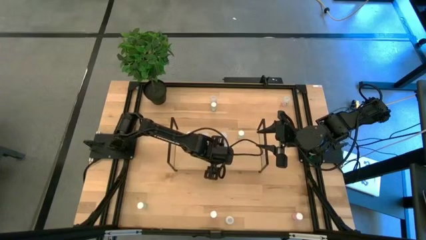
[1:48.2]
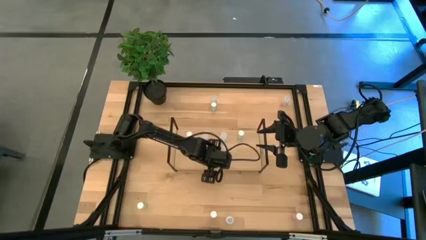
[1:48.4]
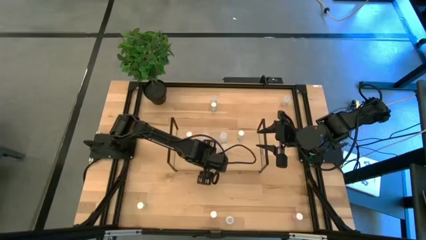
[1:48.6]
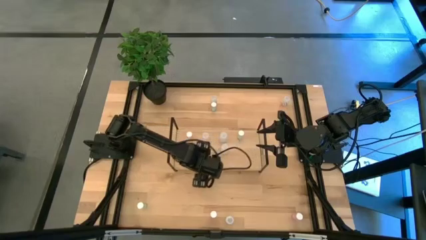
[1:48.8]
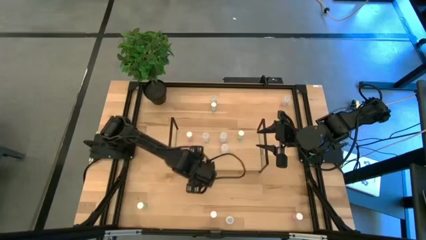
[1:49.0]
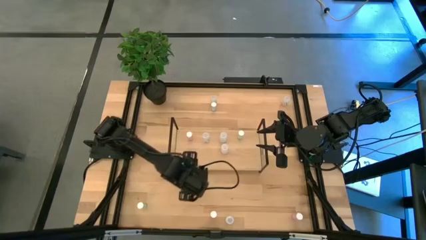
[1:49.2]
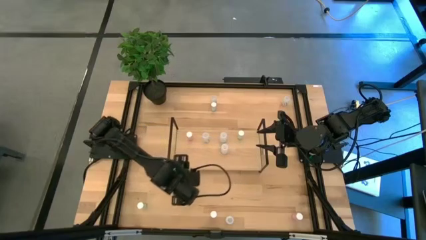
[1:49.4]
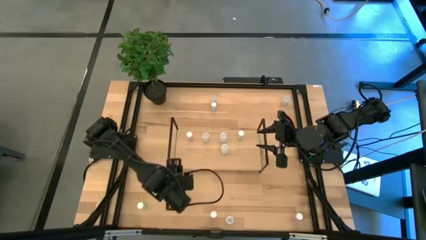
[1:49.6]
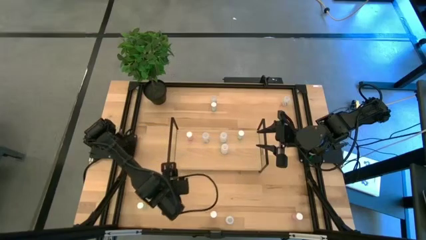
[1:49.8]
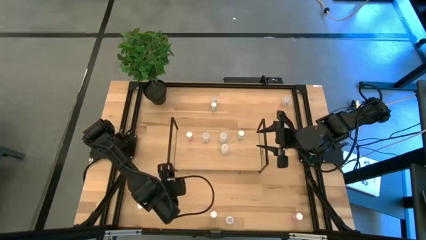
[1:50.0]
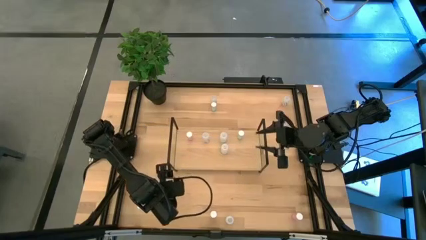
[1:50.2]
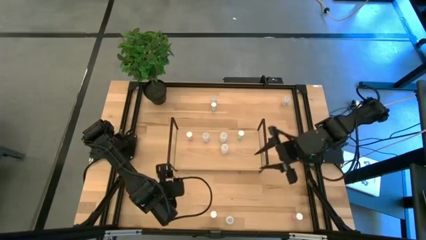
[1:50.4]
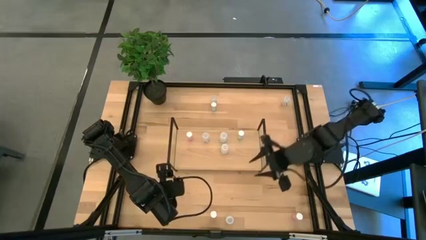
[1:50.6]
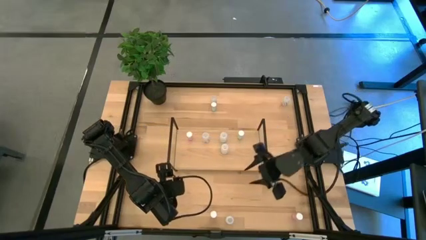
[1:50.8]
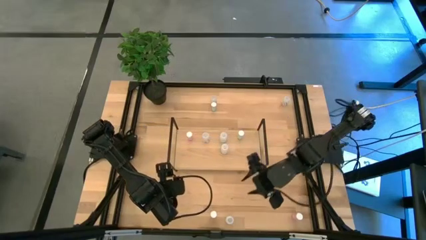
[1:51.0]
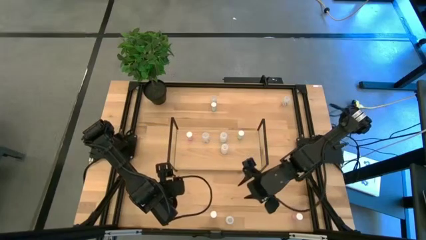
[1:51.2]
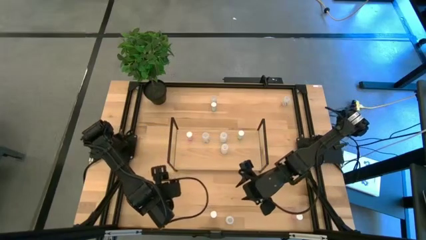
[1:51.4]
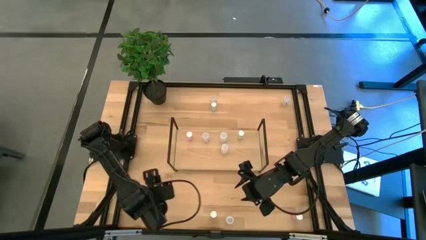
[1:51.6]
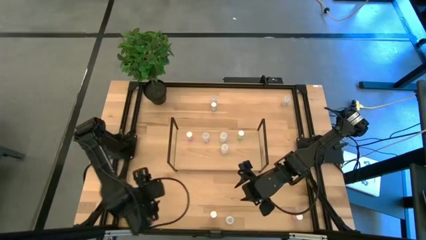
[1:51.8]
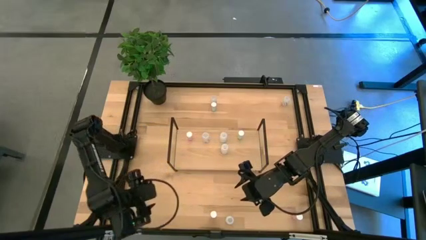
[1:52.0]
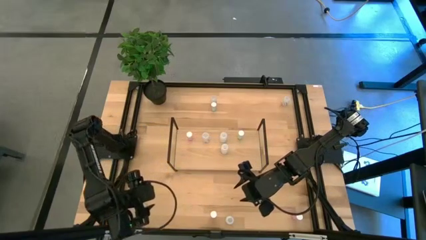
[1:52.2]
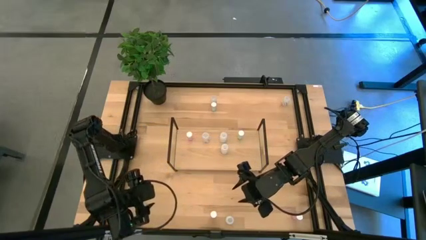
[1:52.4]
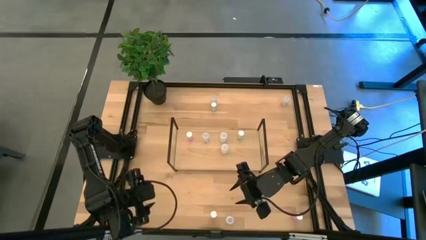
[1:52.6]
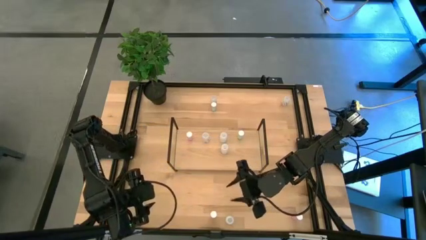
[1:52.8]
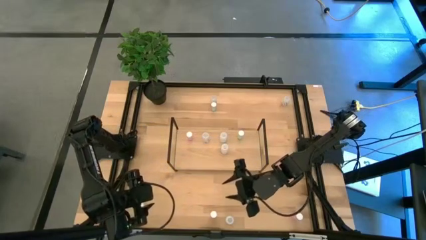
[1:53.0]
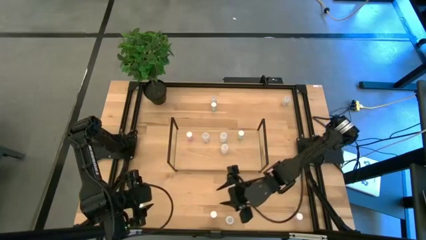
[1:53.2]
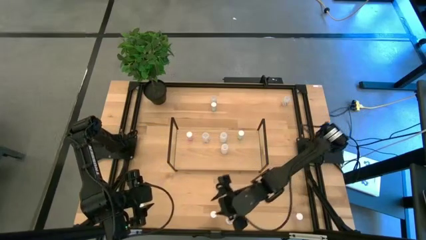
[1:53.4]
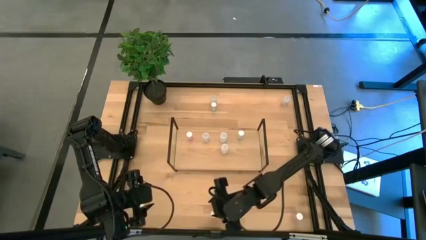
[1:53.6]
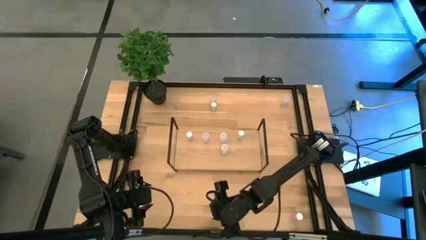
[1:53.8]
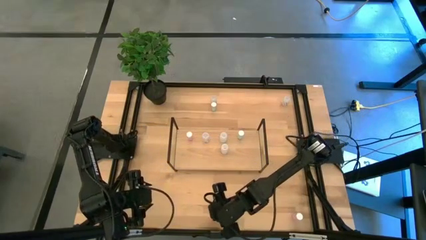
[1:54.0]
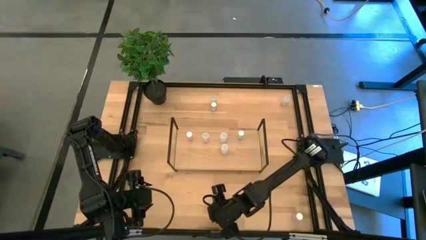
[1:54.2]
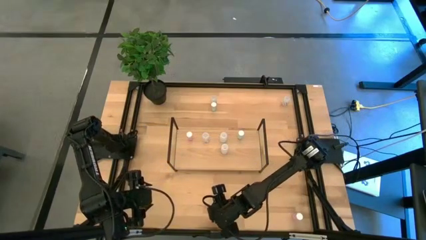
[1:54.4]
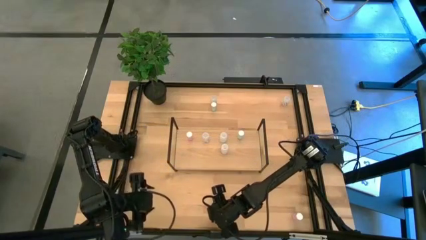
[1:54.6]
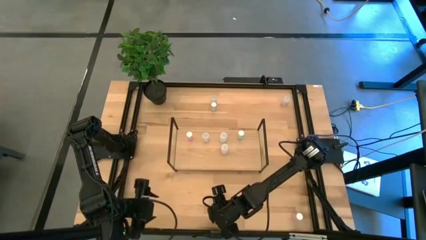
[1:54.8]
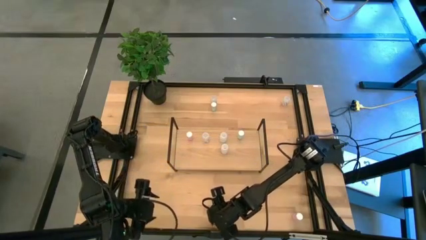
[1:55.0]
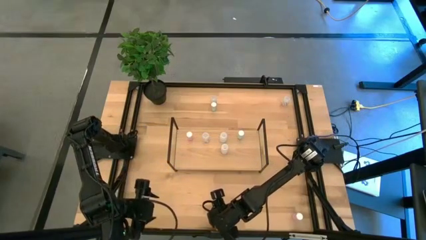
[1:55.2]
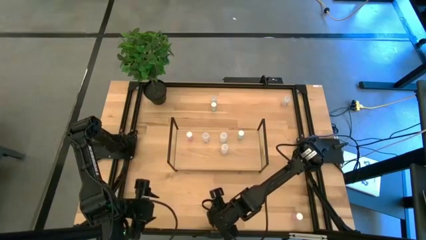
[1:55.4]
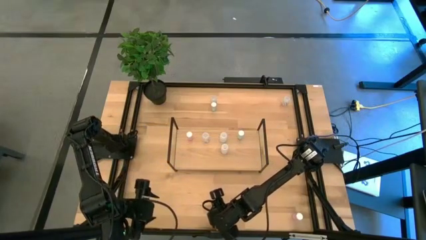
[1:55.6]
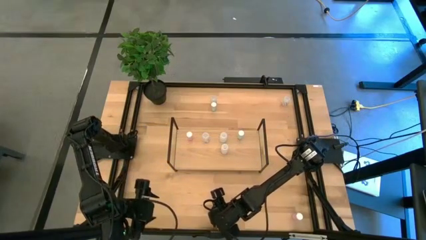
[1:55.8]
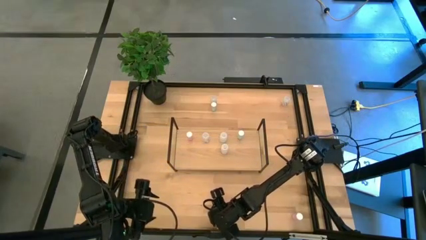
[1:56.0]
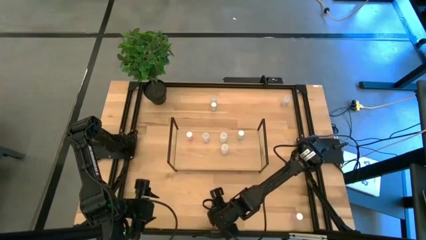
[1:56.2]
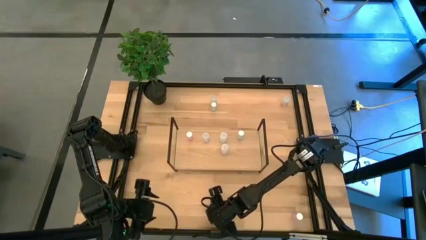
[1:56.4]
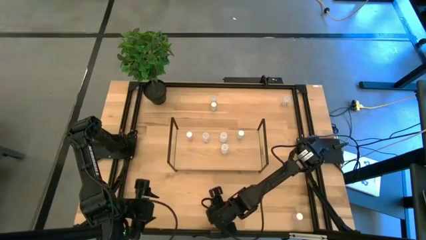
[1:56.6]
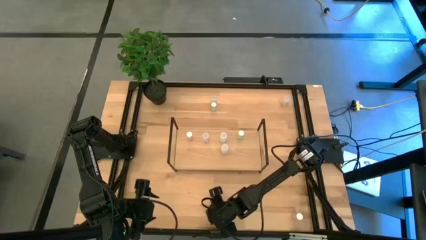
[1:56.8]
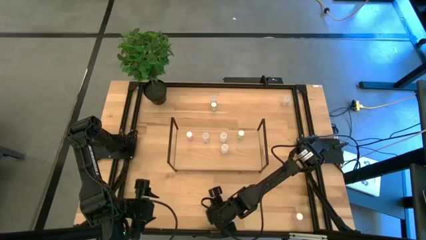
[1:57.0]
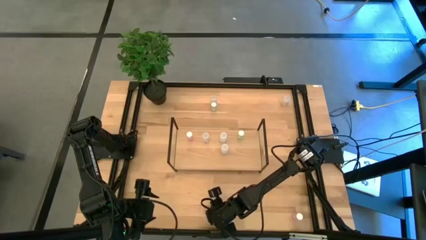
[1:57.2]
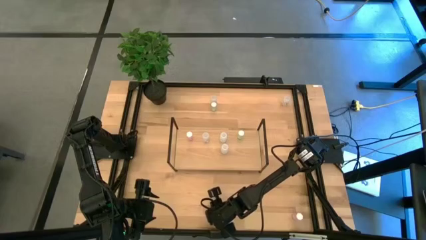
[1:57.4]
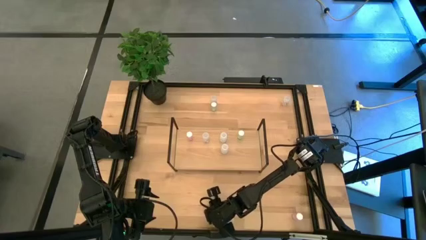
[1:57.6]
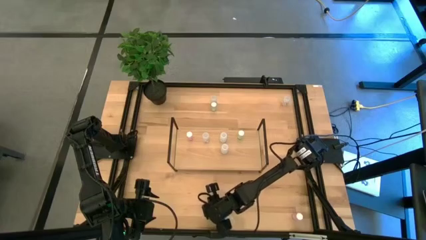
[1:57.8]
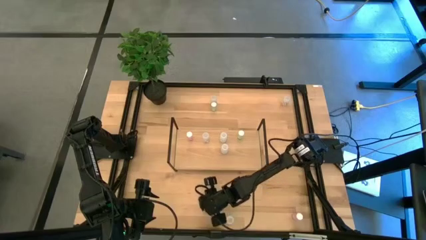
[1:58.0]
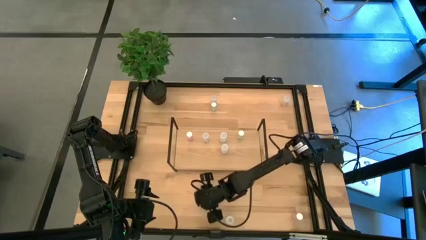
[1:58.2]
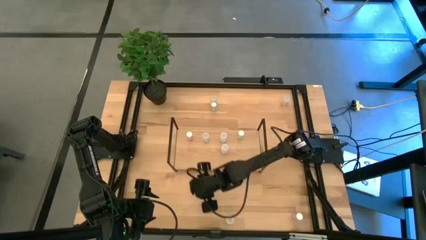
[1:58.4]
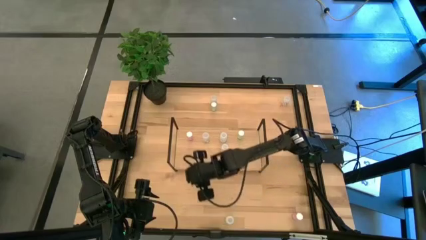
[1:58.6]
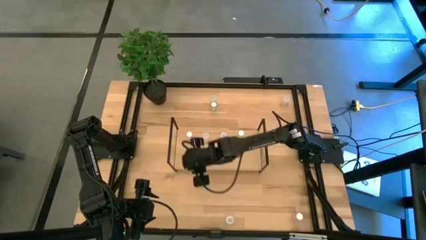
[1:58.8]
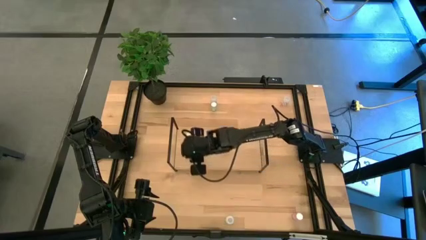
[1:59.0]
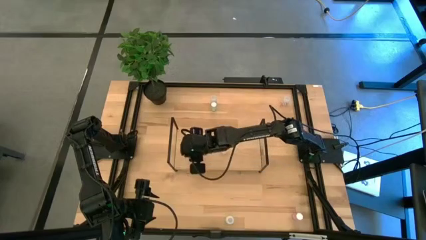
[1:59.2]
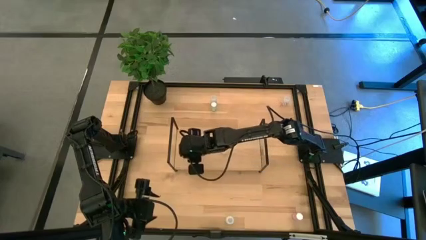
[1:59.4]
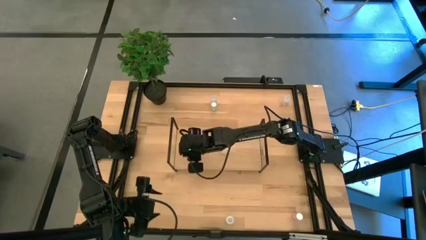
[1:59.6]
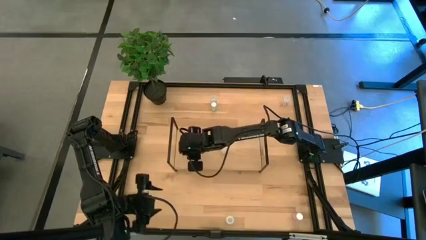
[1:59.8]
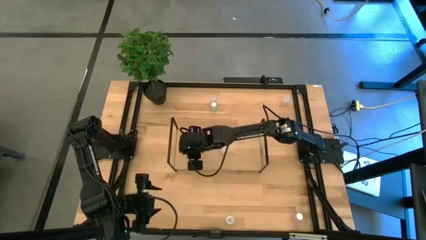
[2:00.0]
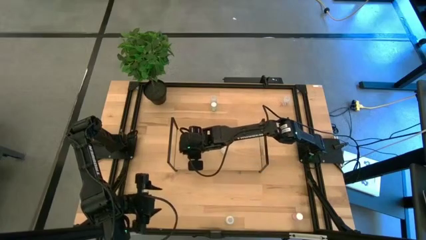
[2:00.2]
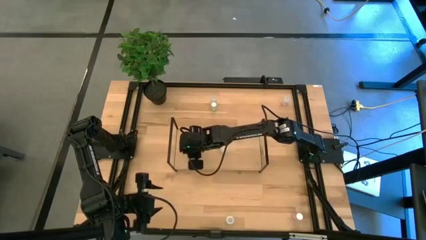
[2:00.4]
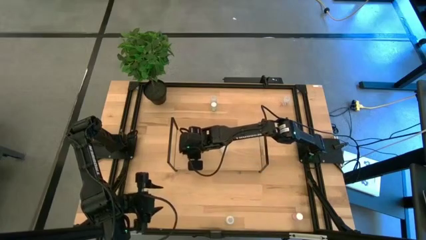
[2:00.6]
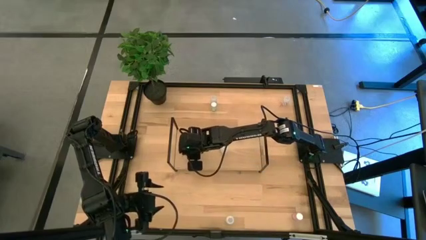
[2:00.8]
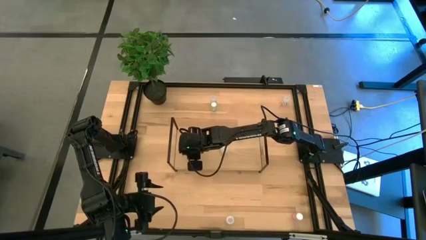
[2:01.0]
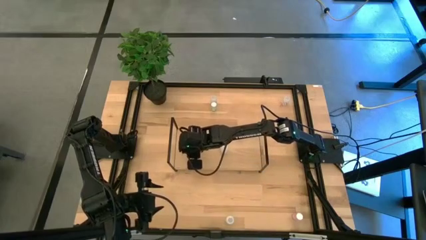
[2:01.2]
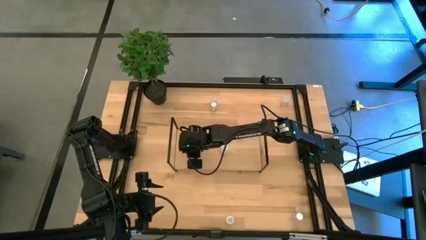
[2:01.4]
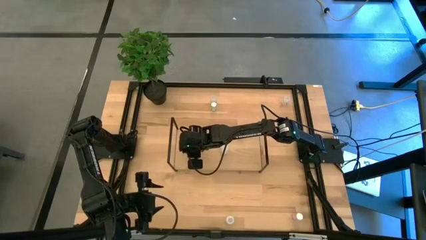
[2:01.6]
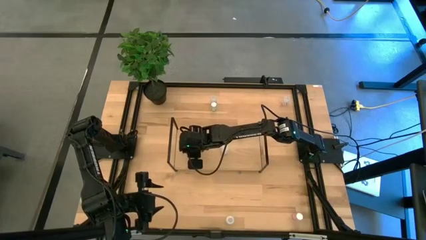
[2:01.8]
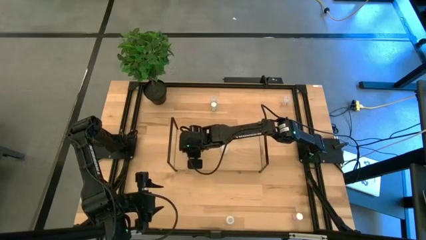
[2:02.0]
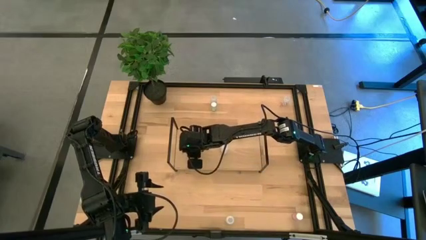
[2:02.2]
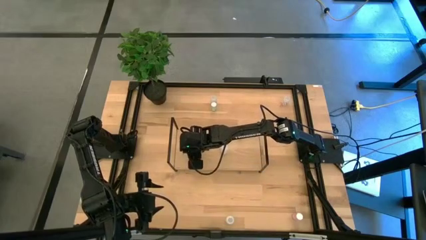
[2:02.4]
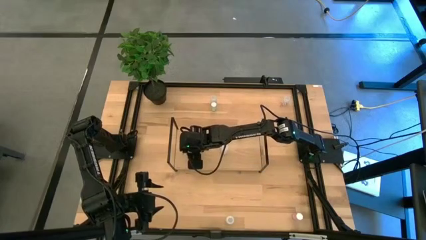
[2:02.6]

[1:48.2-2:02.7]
Task: Pick and place medicine bottles onto shelf by color
Put the left pink pill bottle on the shelf aligned with the other pink pill bottles

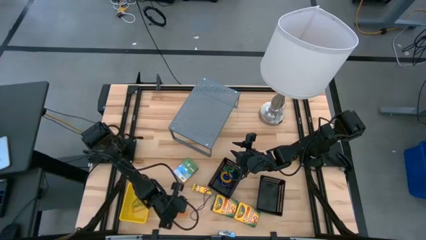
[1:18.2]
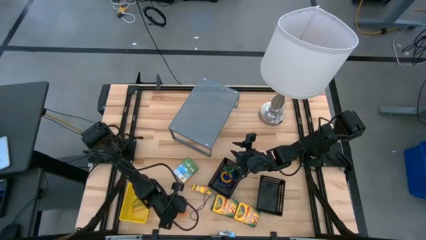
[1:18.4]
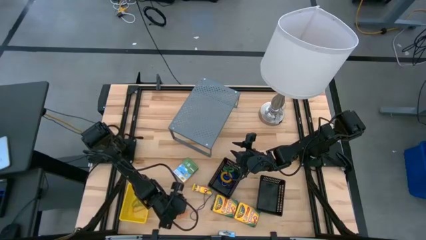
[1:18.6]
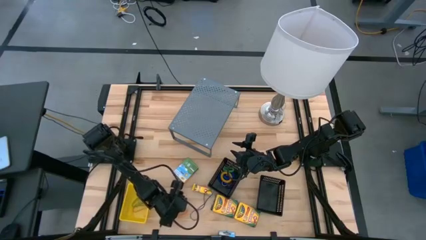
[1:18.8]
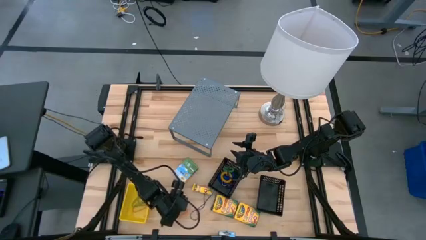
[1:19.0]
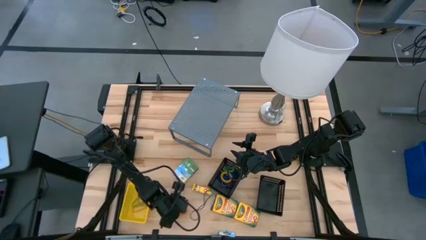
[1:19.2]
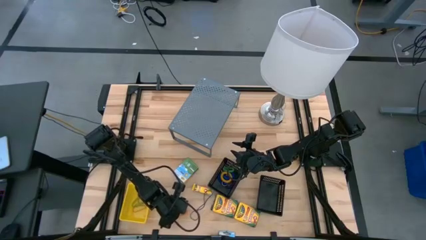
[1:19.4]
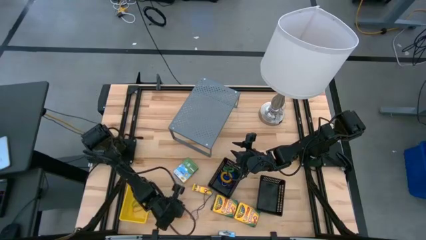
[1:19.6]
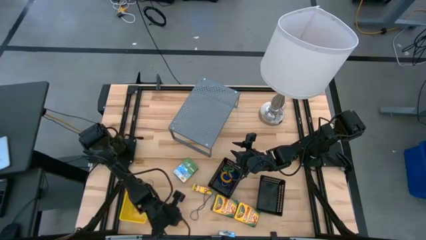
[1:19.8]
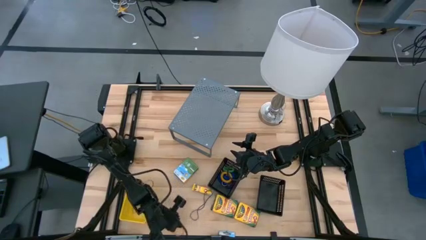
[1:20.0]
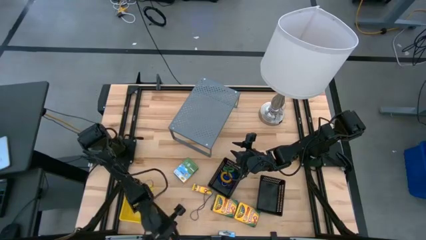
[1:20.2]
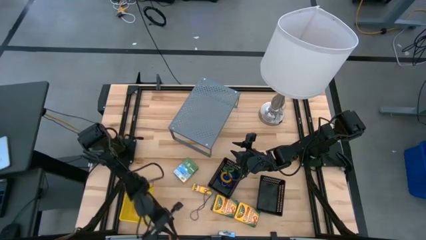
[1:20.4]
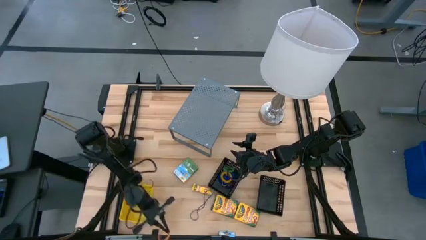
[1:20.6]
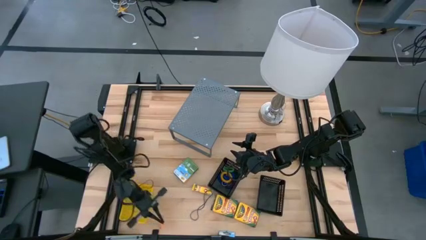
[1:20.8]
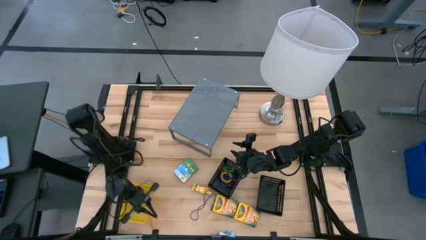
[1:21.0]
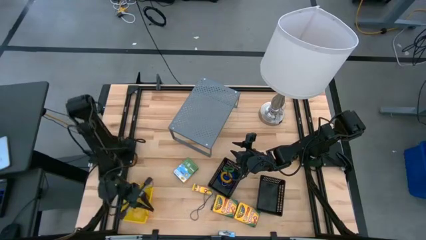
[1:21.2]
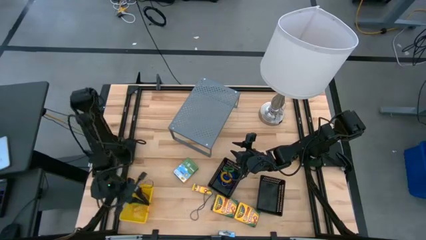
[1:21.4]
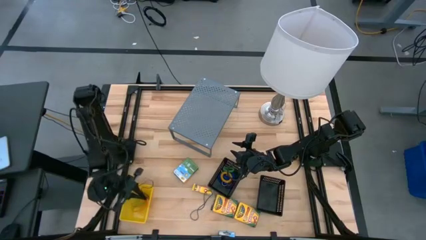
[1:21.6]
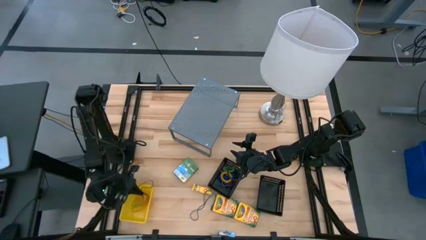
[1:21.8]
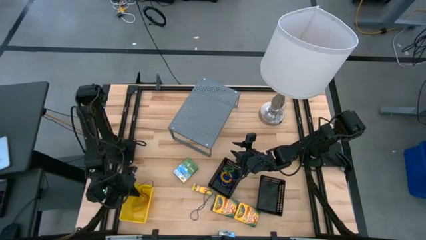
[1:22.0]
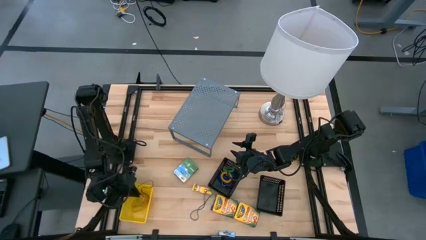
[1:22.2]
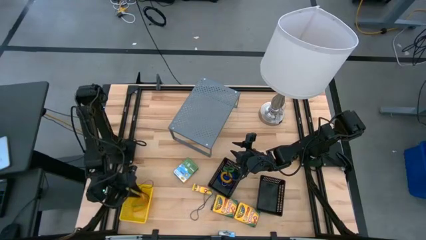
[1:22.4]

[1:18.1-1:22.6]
Task: Pick & Place Office Desk Supplies
Put the orange rubber band into the yellow bin
